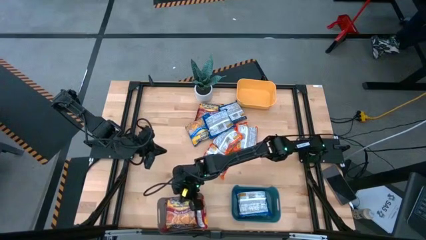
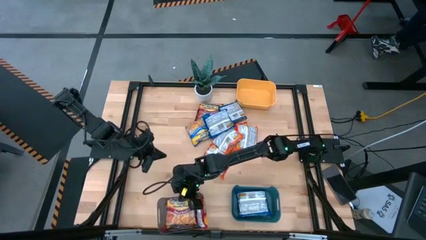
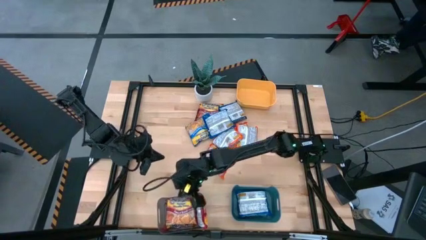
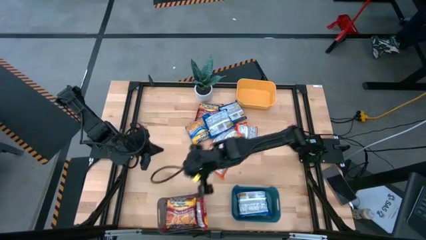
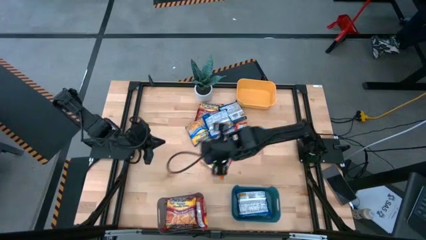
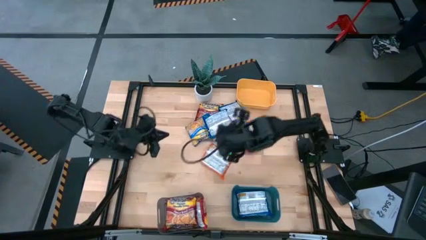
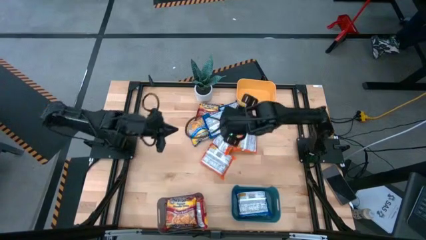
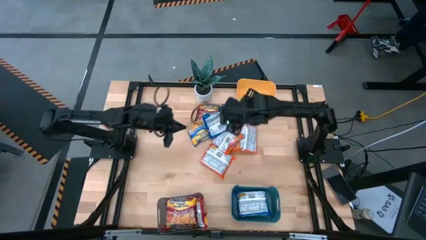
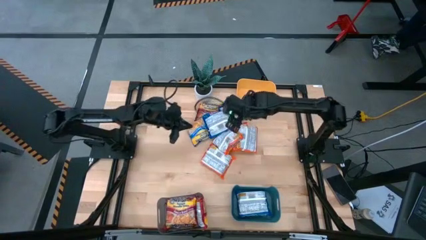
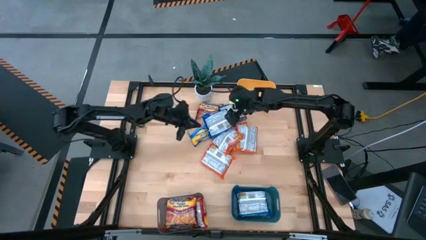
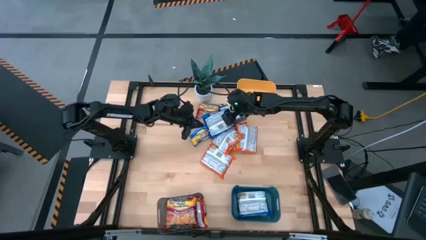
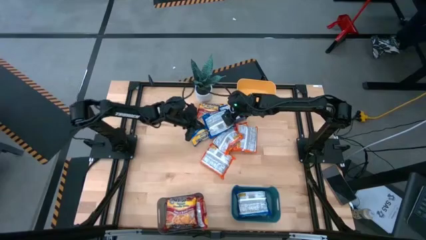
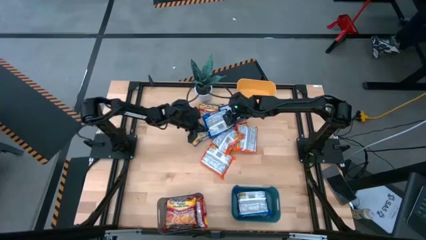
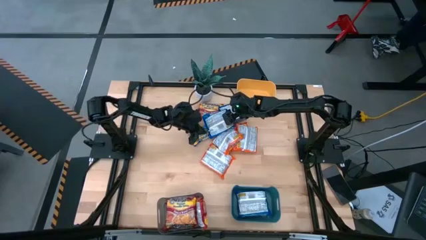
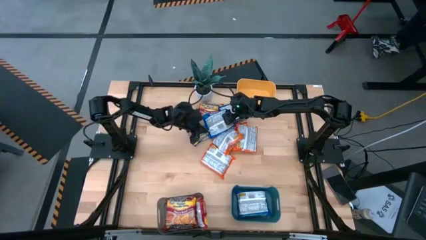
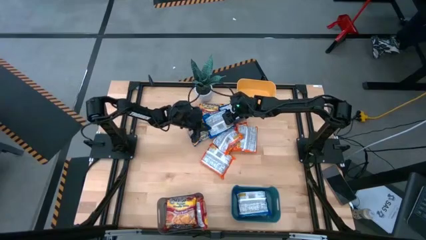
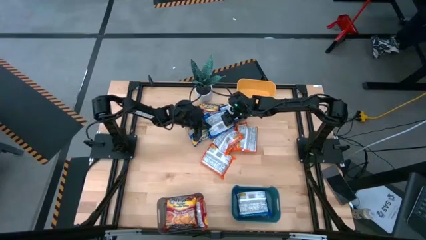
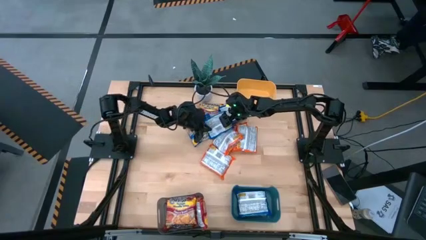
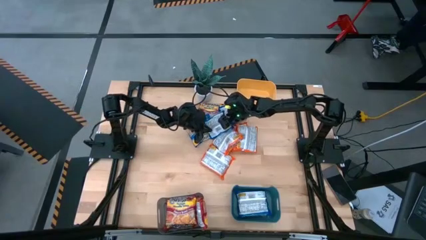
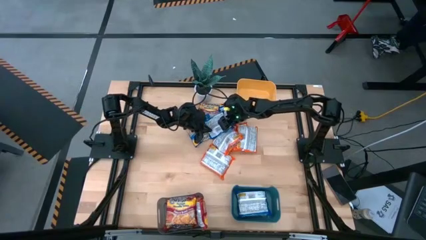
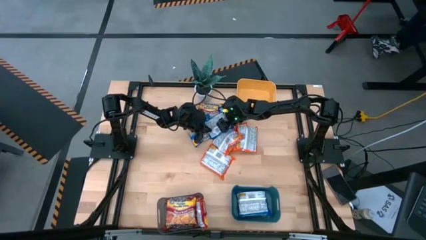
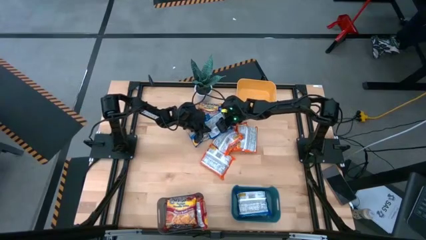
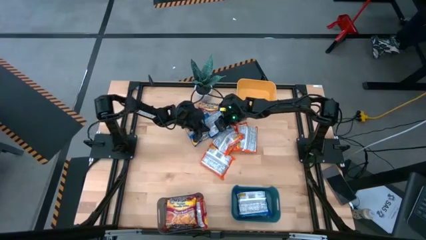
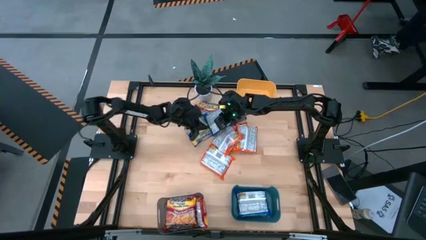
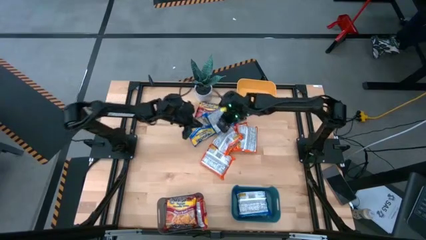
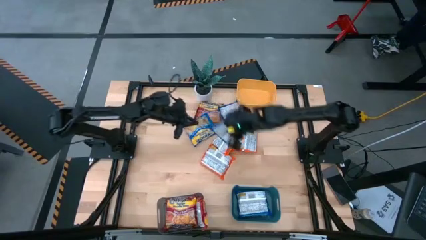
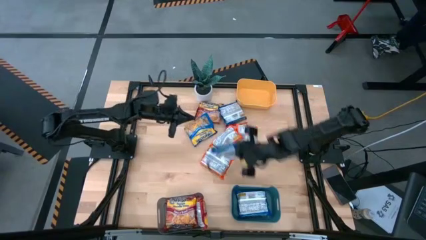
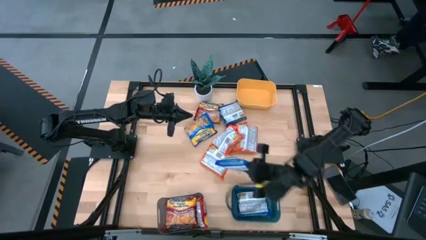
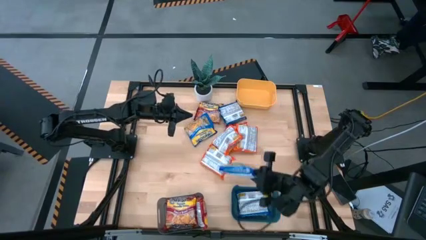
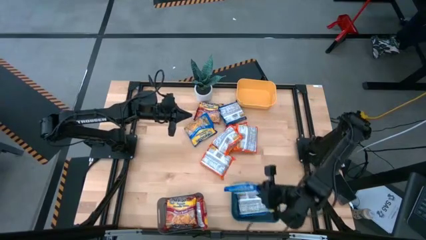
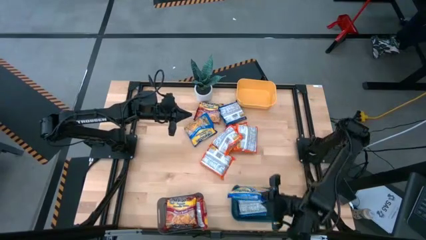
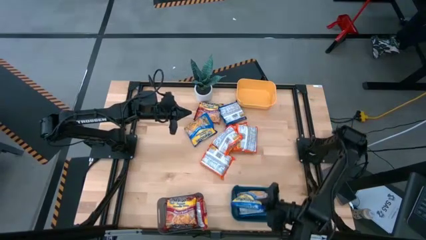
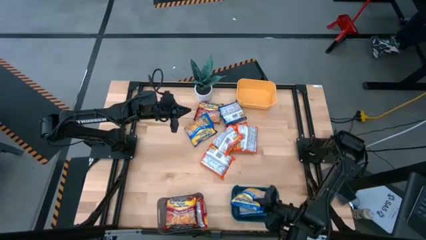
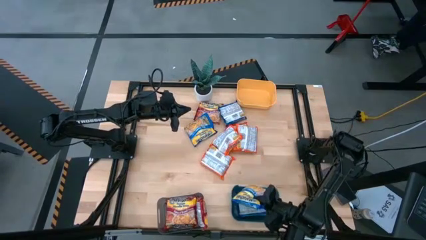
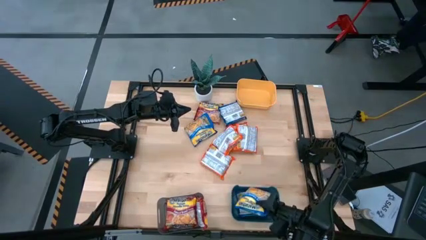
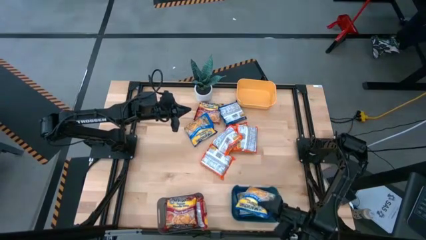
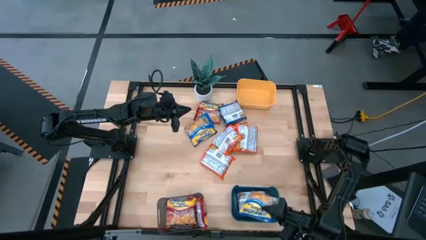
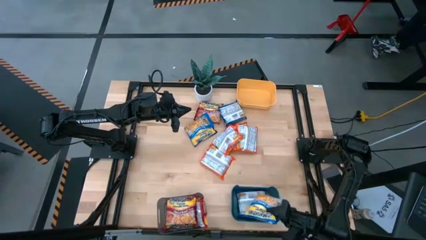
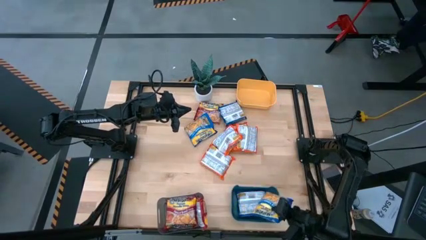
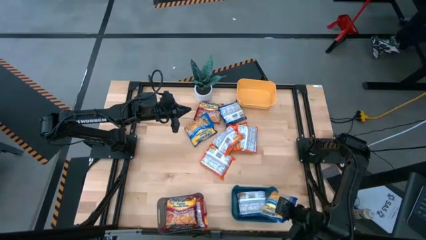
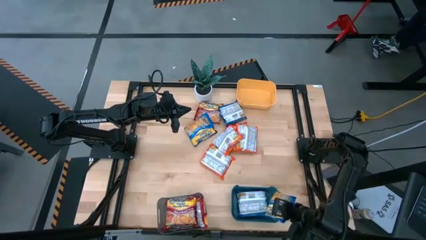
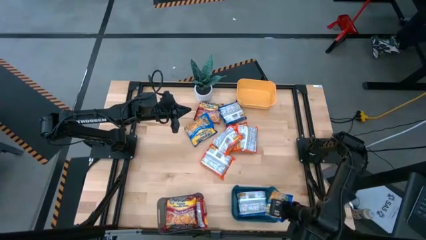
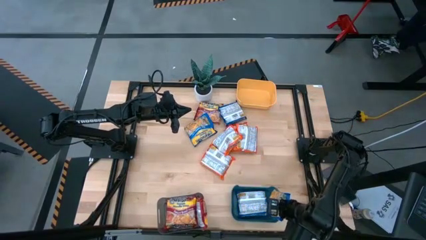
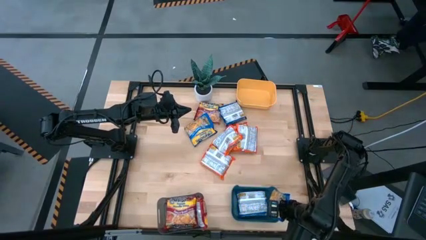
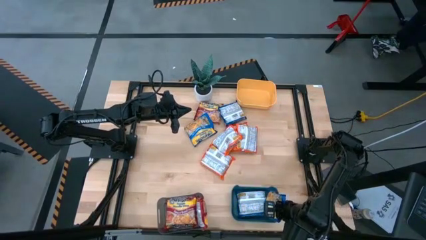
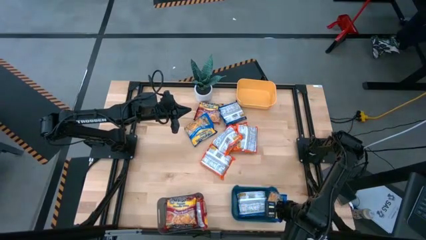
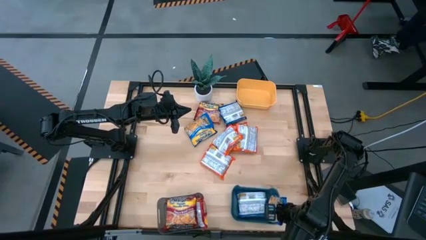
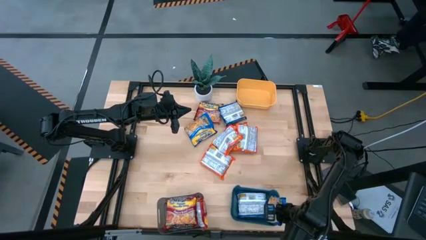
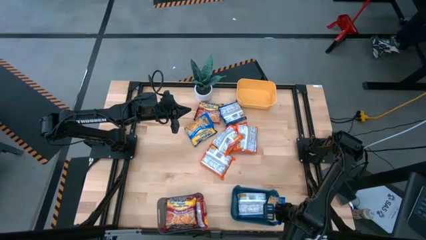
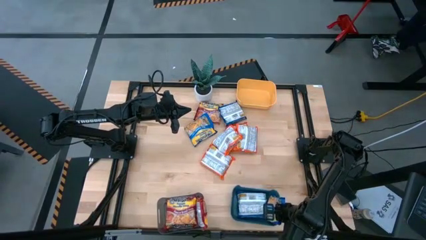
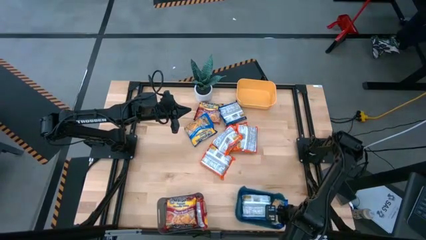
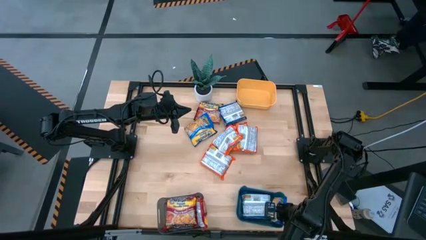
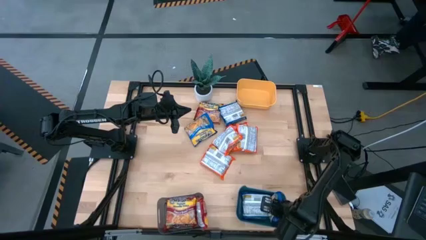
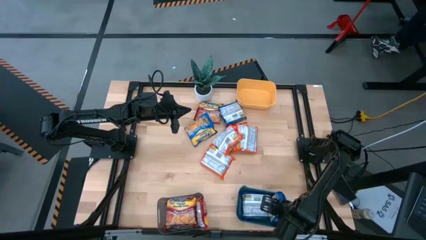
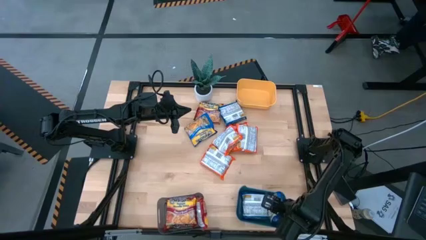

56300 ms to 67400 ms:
Task: Sort Maruchan noodles
Put the blue noodle pack into the blue bin
